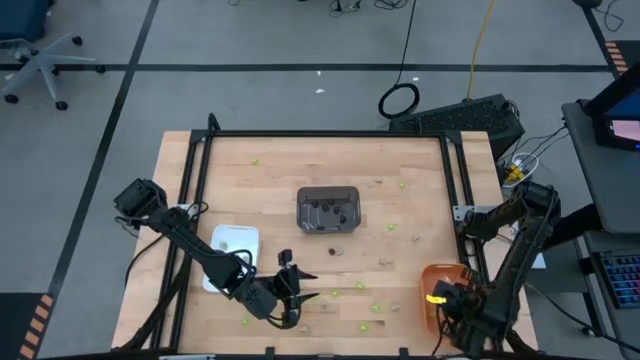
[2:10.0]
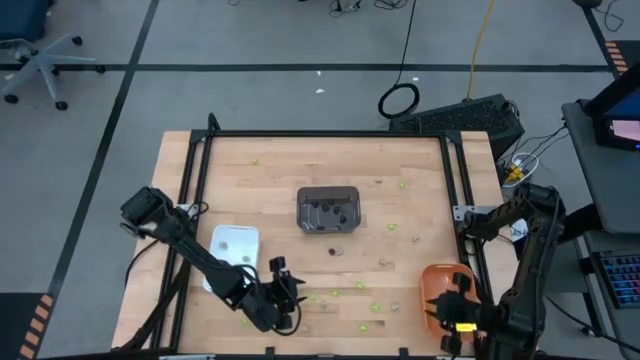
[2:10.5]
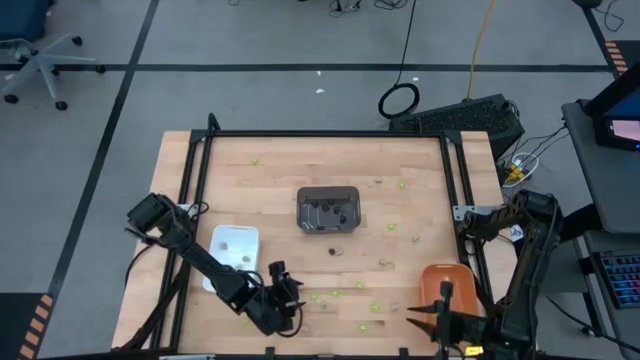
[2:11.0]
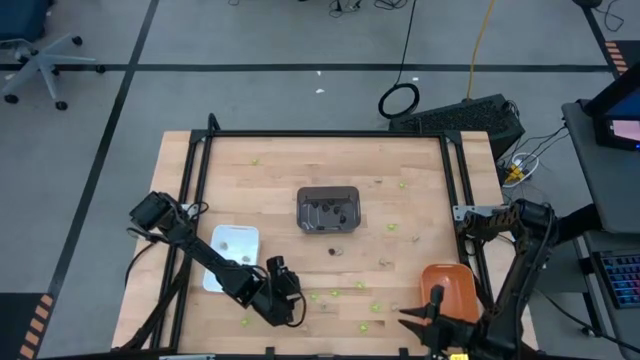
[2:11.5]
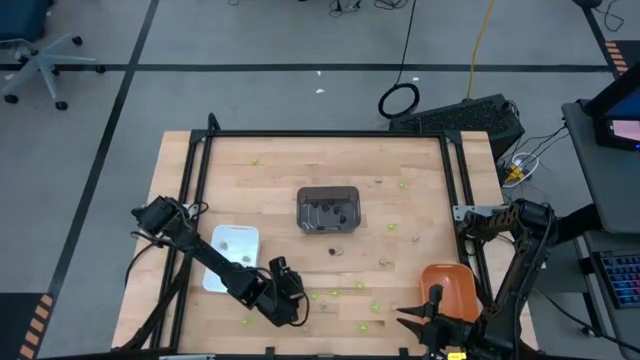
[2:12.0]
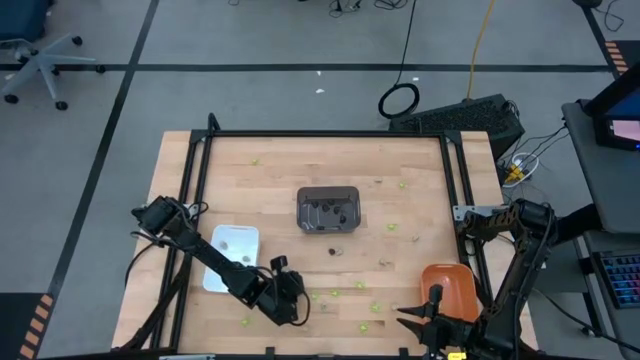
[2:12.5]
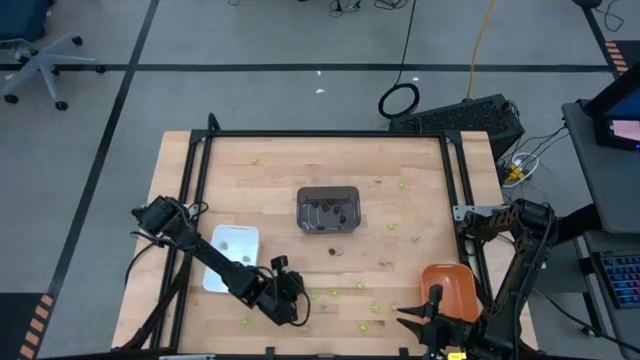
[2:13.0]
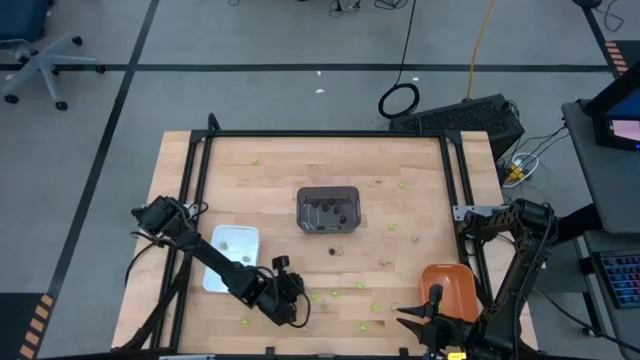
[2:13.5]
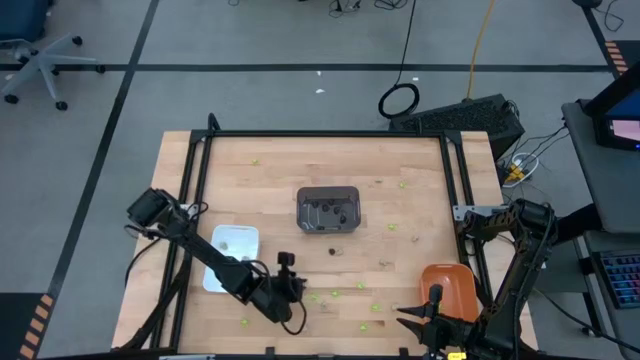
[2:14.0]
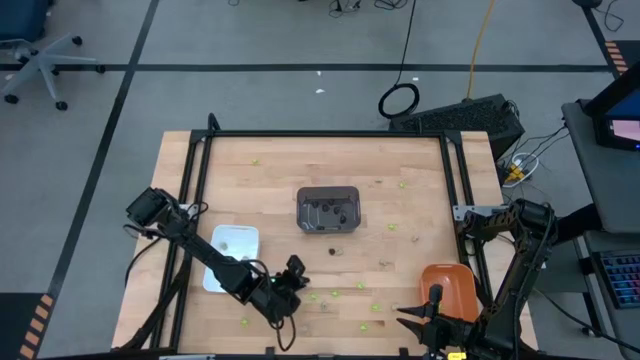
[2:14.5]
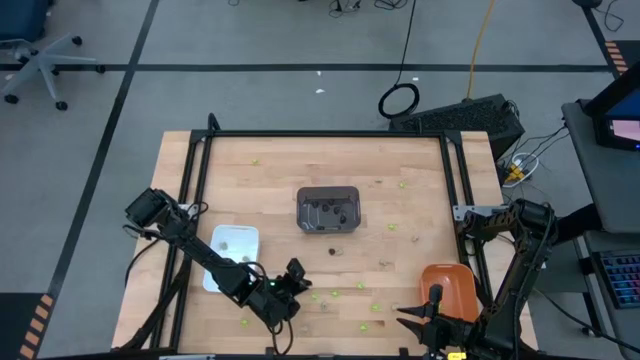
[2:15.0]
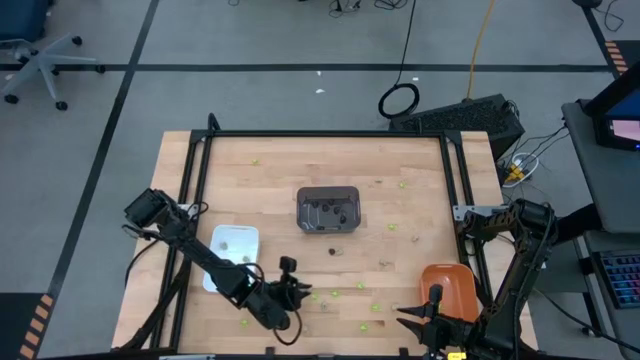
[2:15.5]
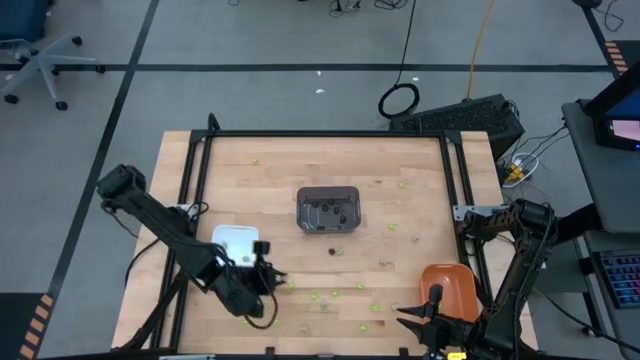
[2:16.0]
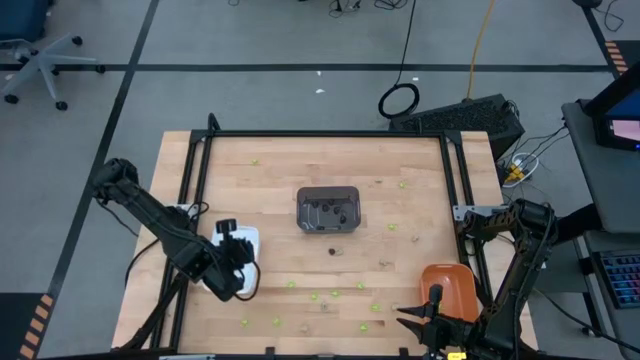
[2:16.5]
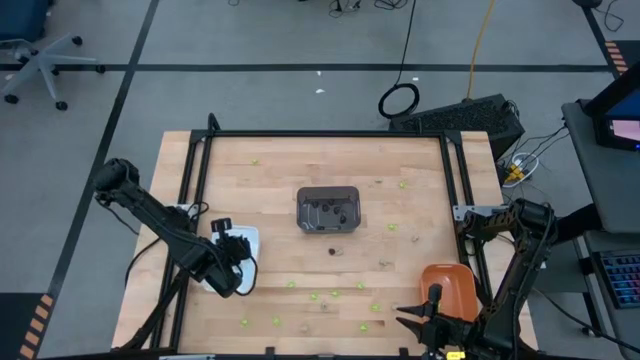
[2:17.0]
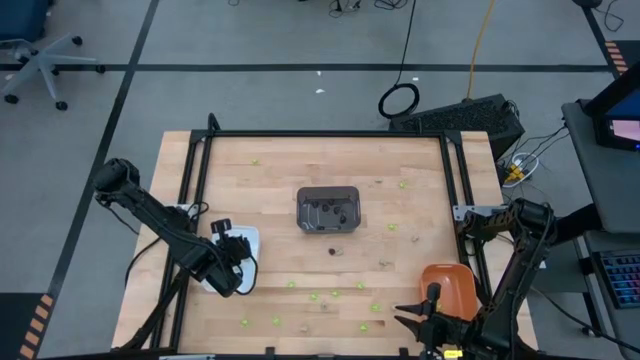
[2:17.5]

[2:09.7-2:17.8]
Task: Sort Halloween decoration
Put the white skull toy into the white bin

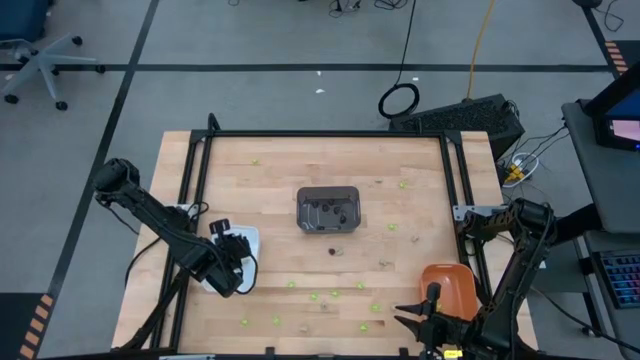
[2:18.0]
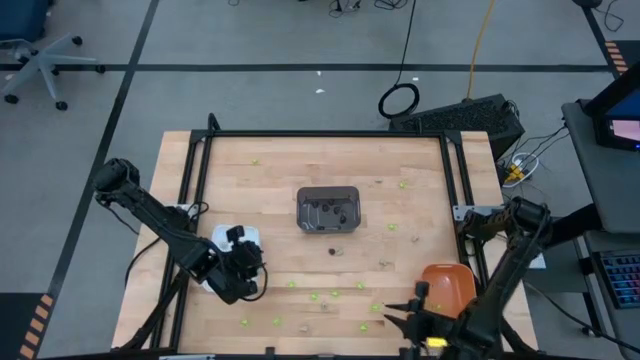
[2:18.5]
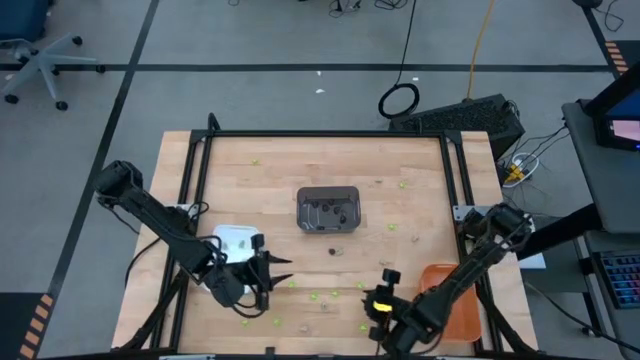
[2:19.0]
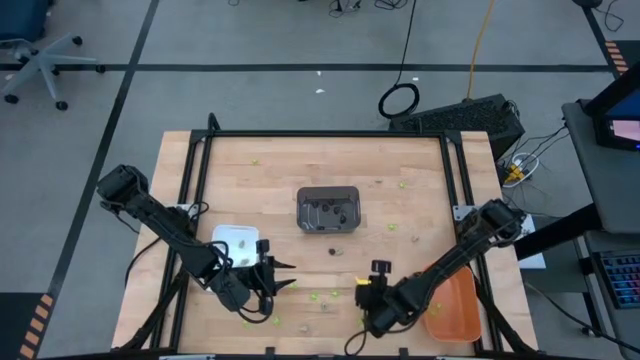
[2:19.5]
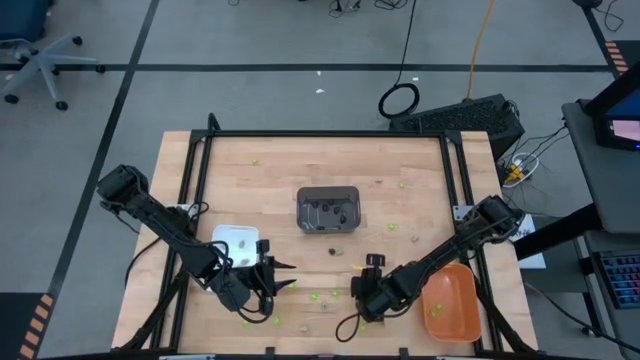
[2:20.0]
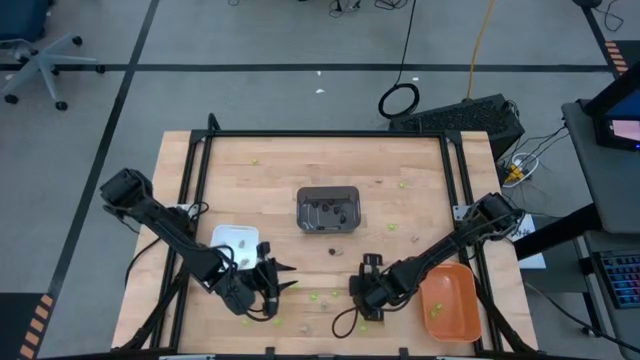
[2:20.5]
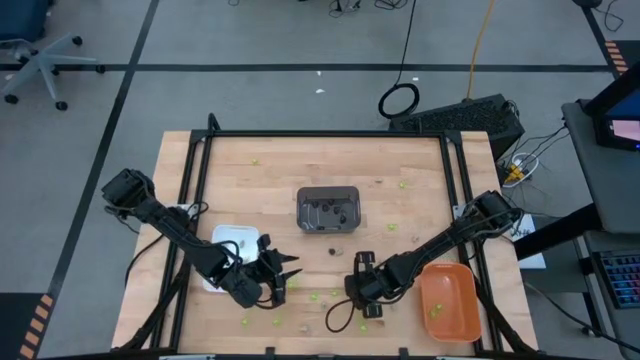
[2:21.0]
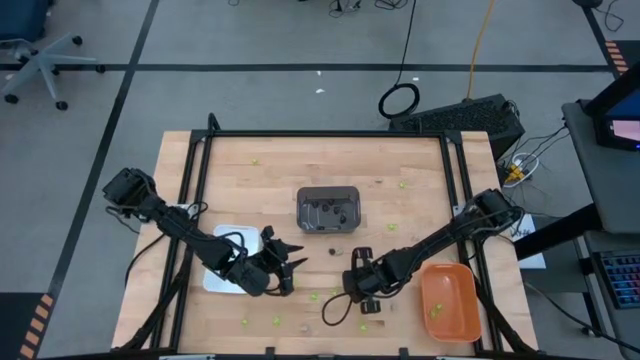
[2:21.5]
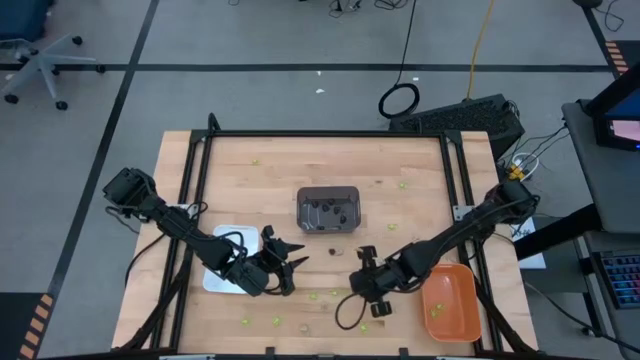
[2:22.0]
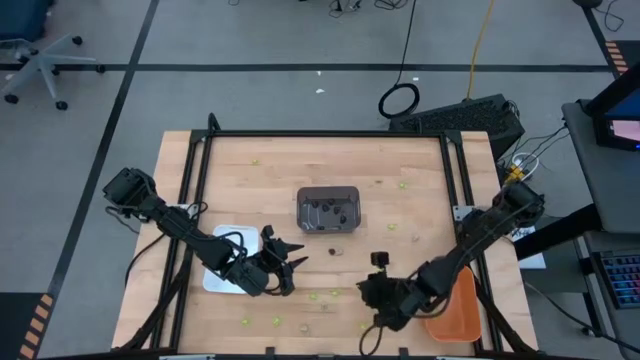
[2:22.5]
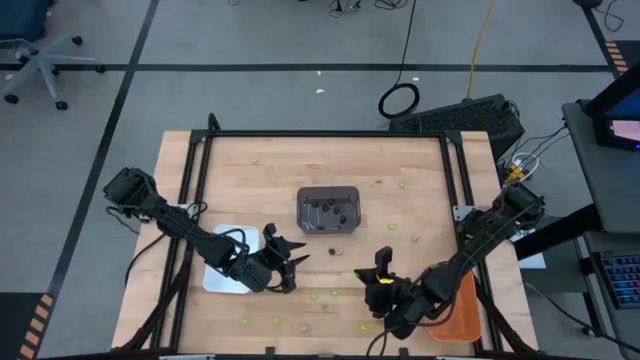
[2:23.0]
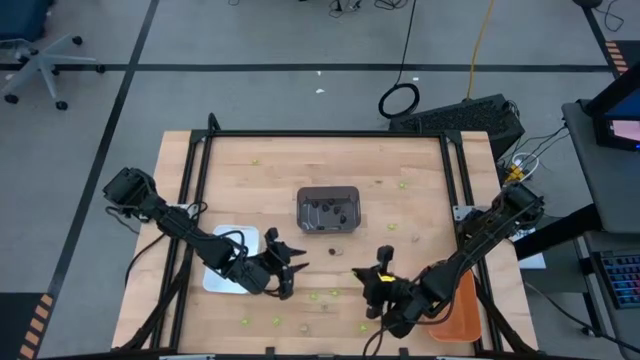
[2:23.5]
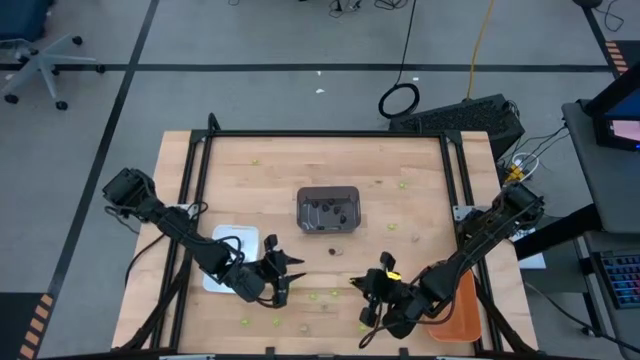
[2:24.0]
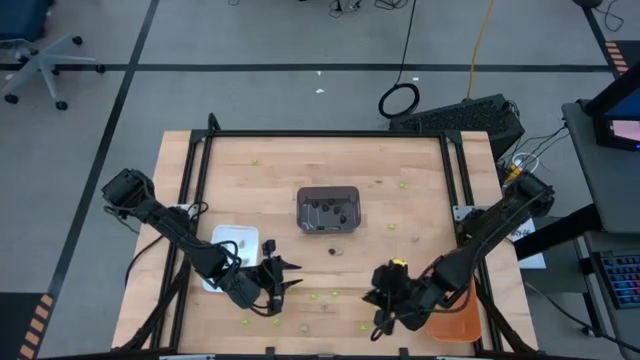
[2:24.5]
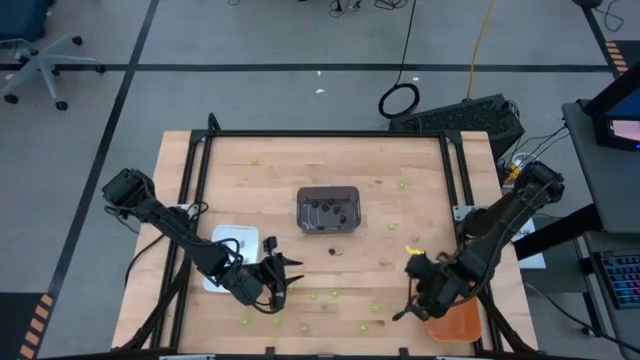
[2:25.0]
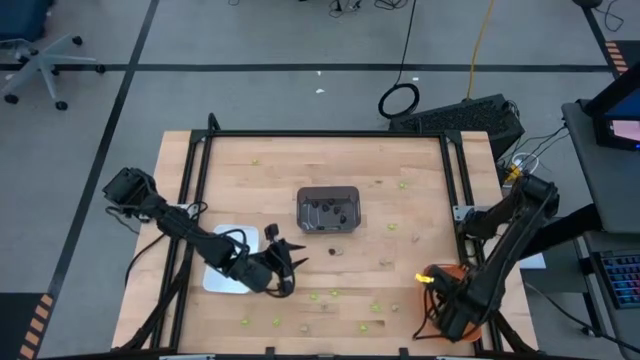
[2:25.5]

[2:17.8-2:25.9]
Put the green spider toy into the orange bin

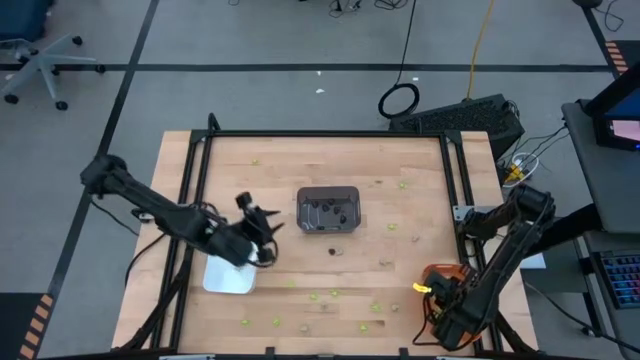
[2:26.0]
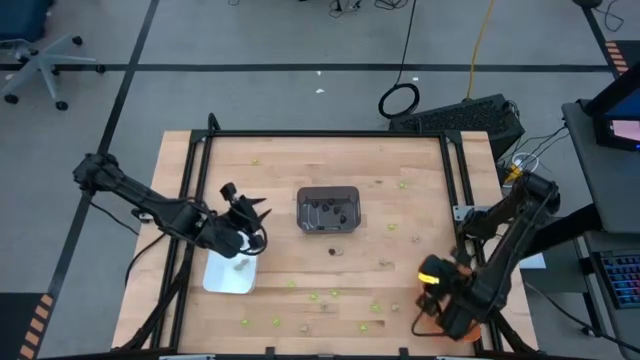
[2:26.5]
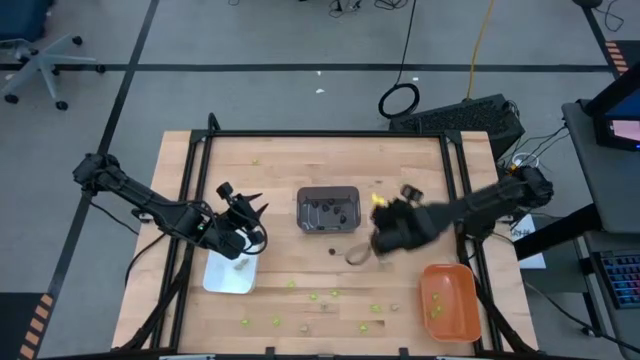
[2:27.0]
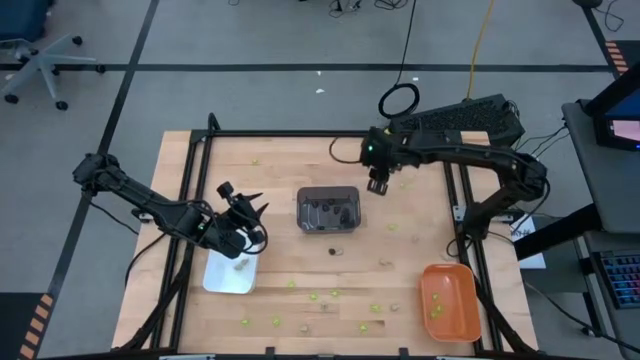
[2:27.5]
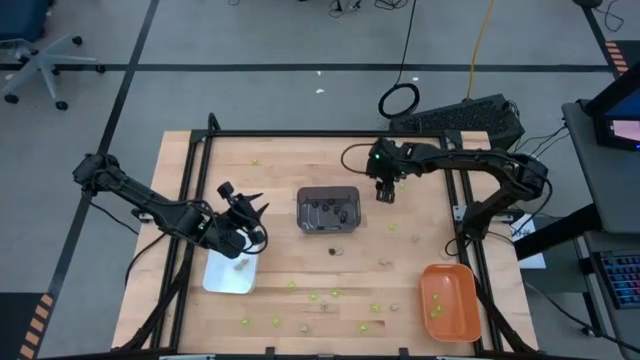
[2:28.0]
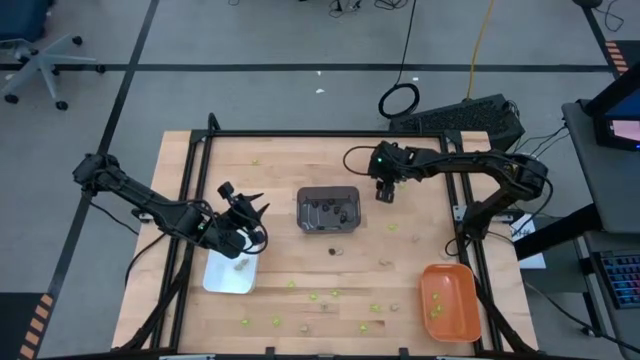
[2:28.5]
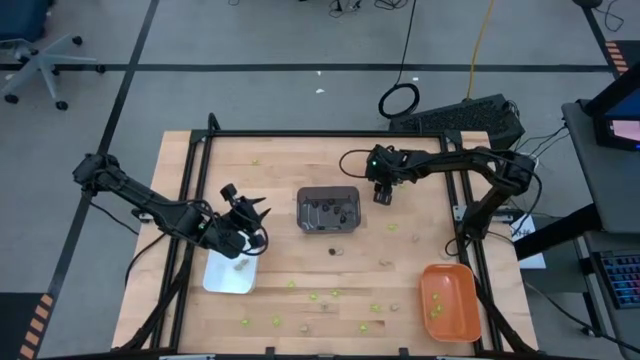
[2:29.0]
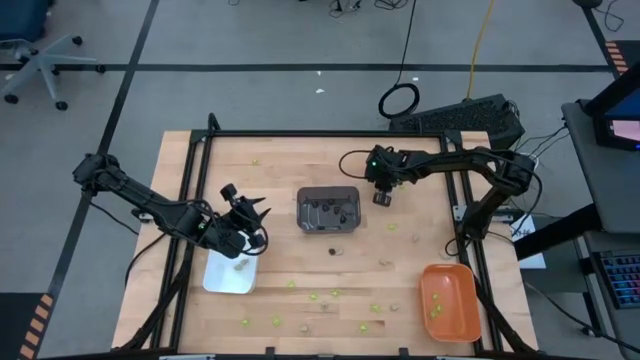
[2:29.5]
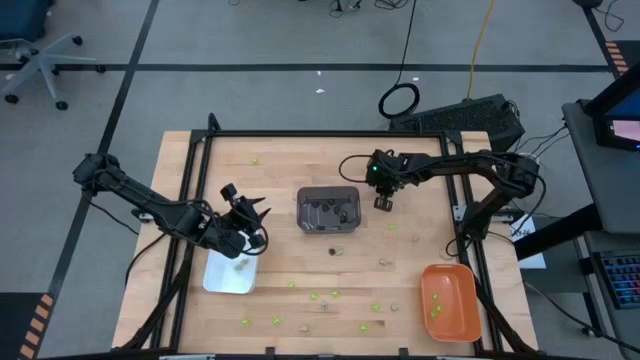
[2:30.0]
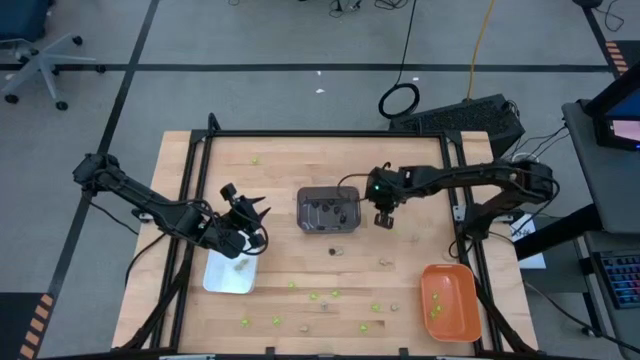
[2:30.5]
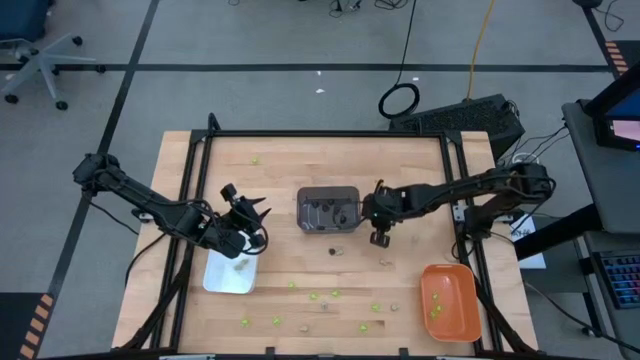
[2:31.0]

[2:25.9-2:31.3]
Put the white skull toy into the white bin
